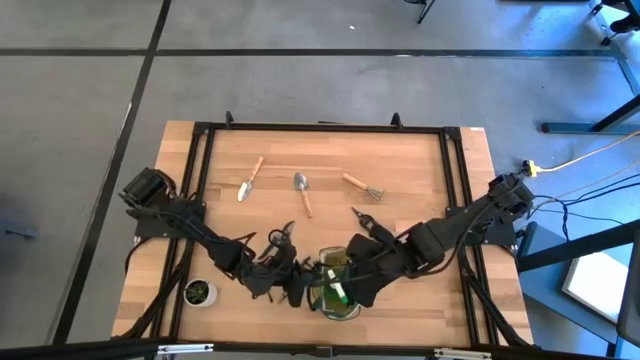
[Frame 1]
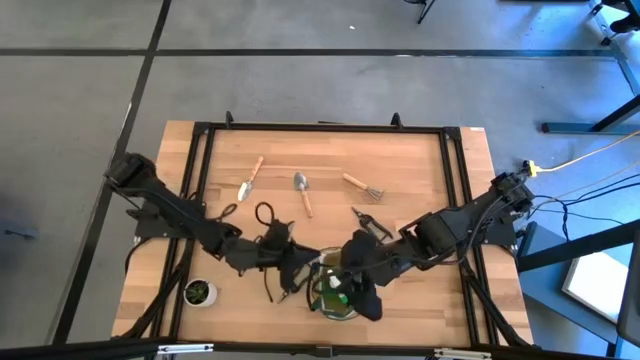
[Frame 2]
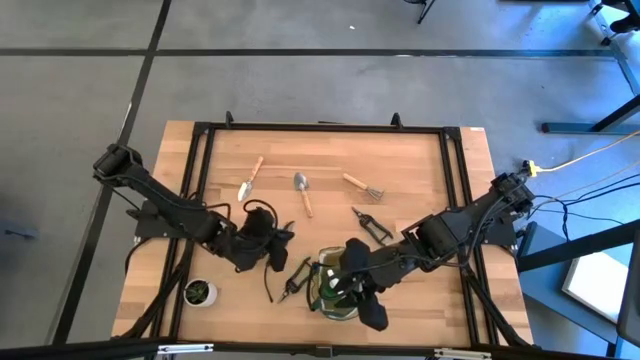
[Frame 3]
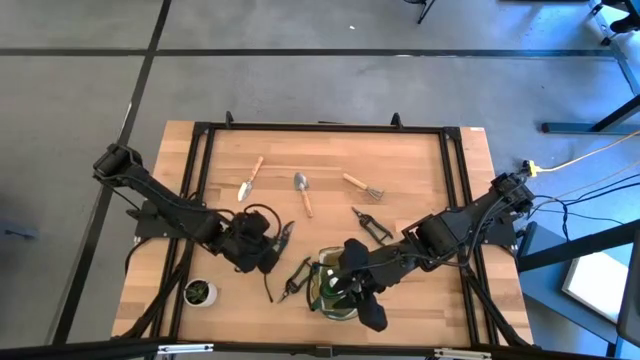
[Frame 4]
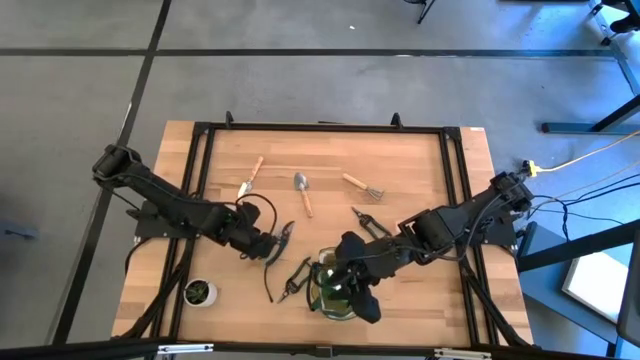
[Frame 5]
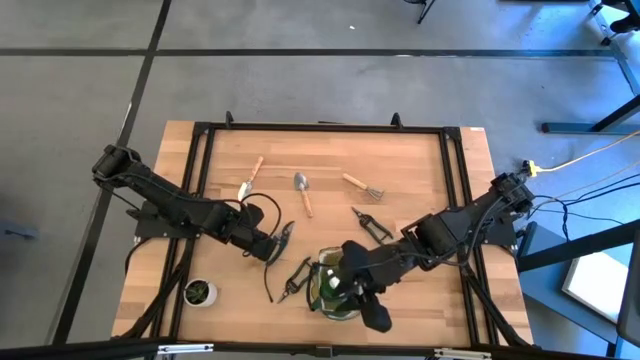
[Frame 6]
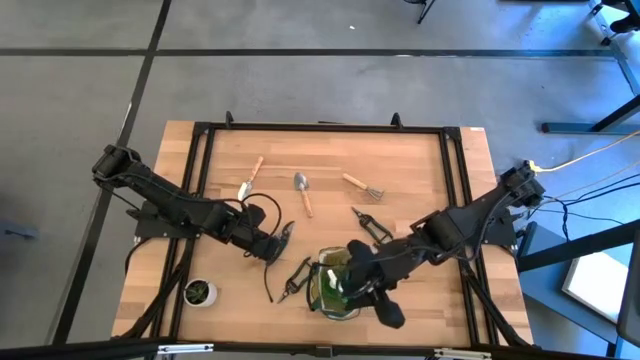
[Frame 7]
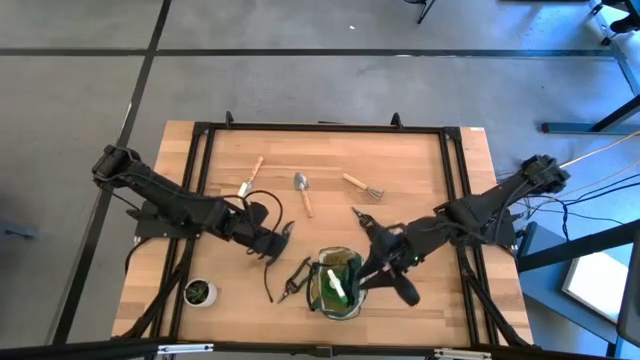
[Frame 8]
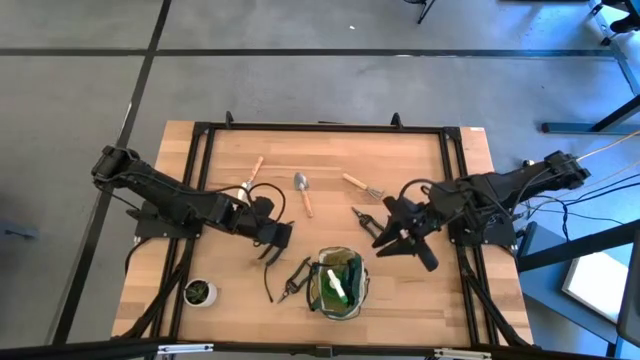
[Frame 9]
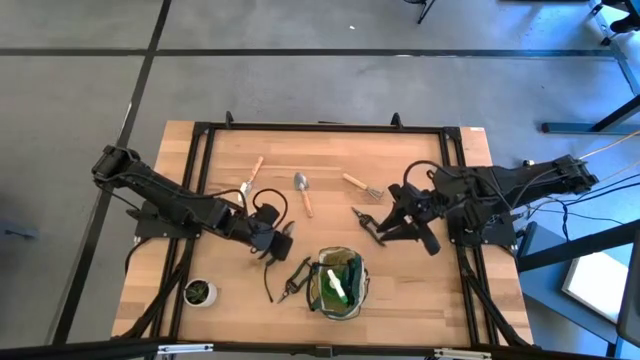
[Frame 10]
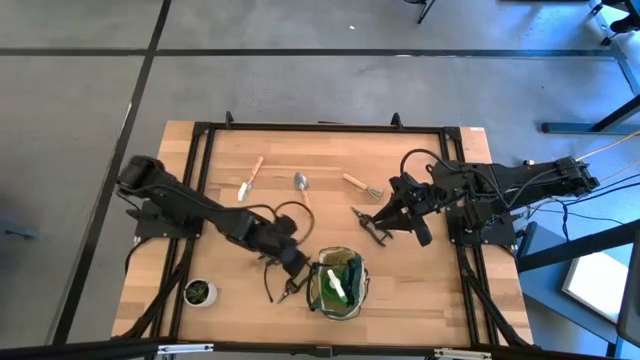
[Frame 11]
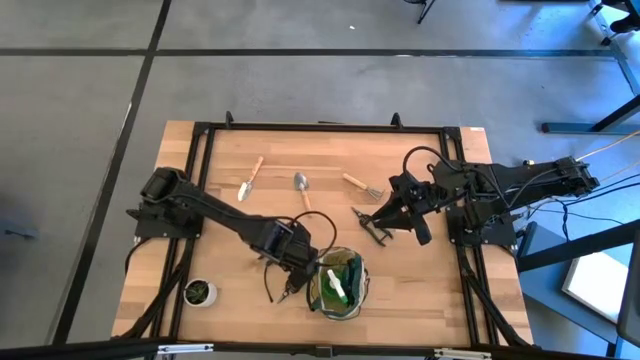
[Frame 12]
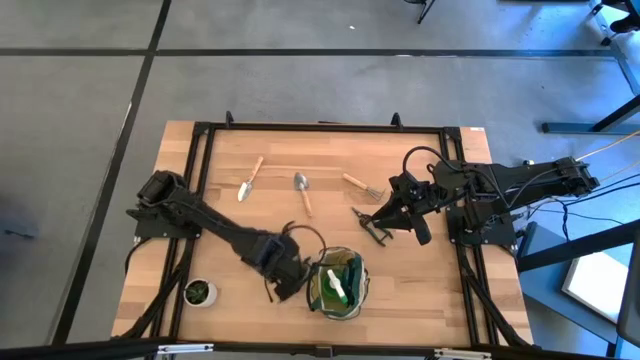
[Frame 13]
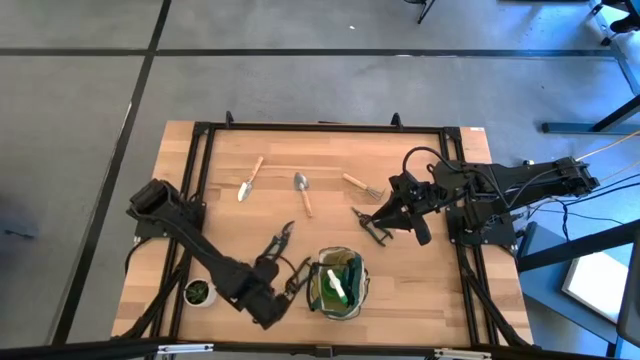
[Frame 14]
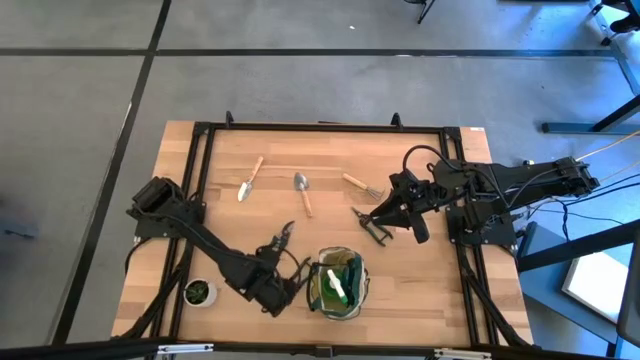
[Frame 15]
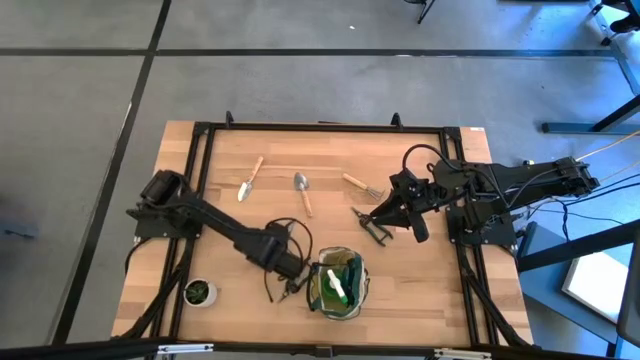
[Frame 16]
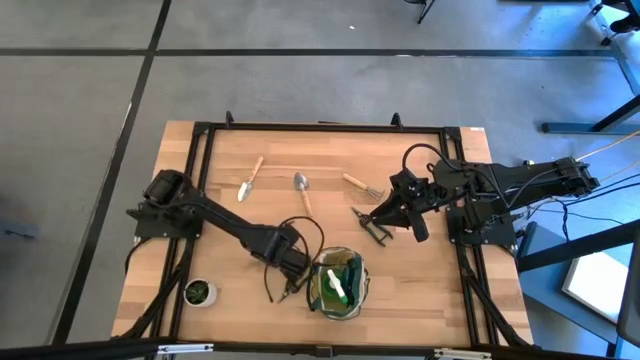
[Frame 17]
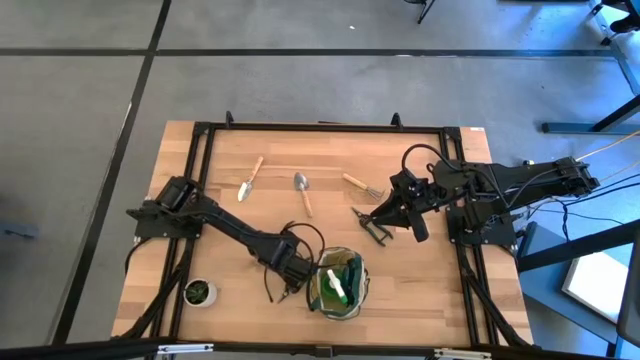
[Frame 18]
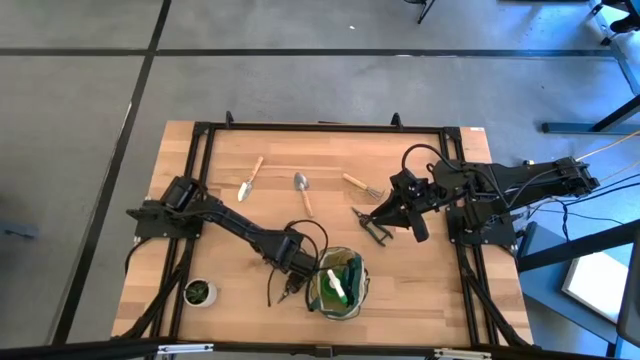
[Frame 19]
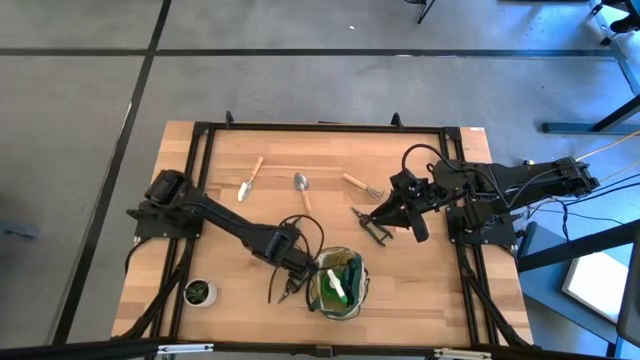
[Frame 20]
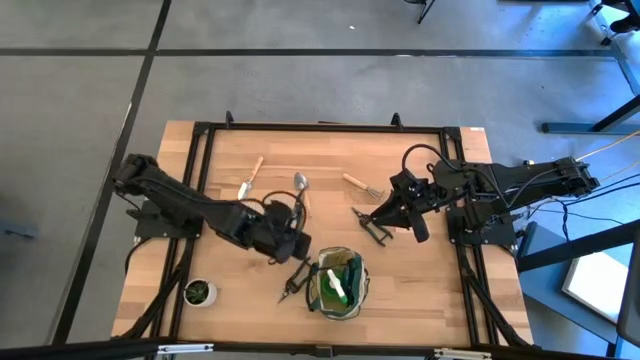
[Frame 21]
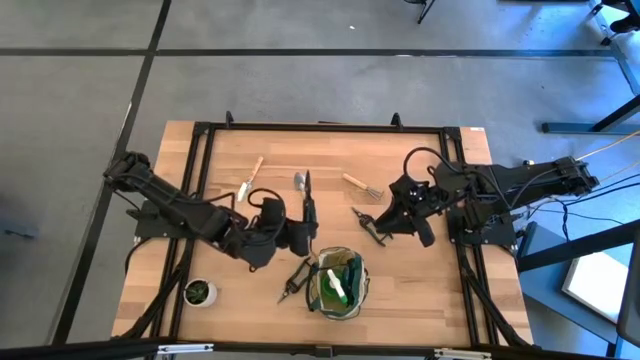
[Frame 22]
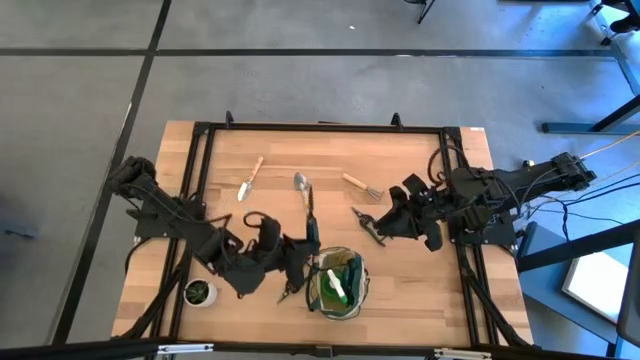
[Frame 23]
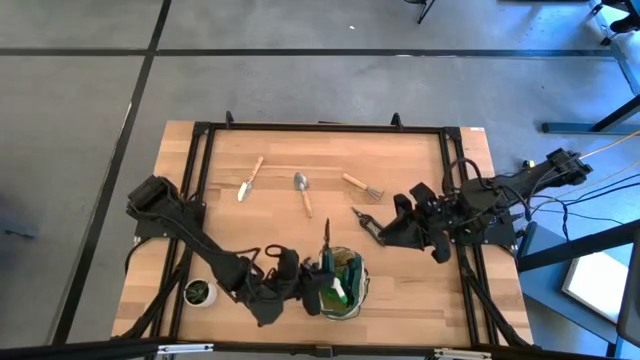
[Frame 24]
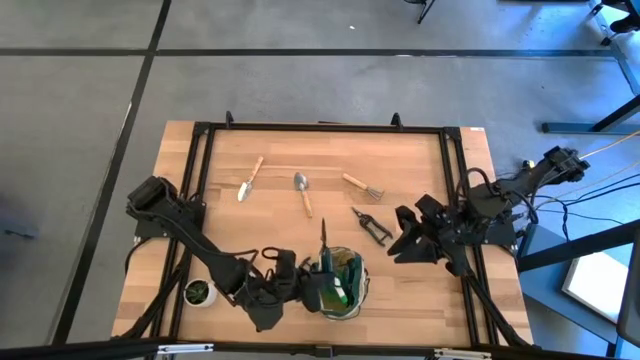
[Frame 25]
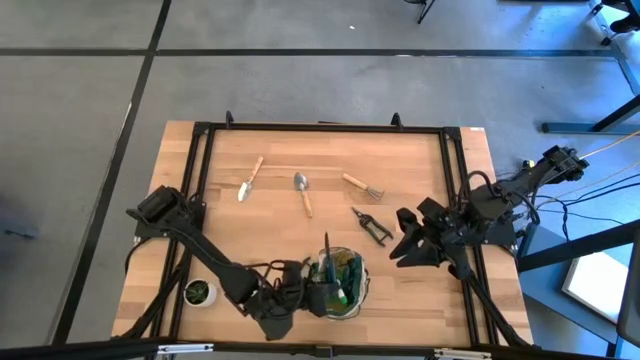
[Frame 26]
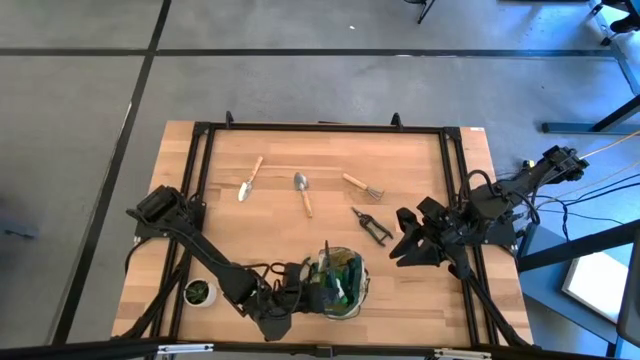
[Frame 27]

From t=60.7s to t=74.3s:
Task: Pick & Place Garden tools in Gardening bag
Put the green shear scissors into the gardening bag
